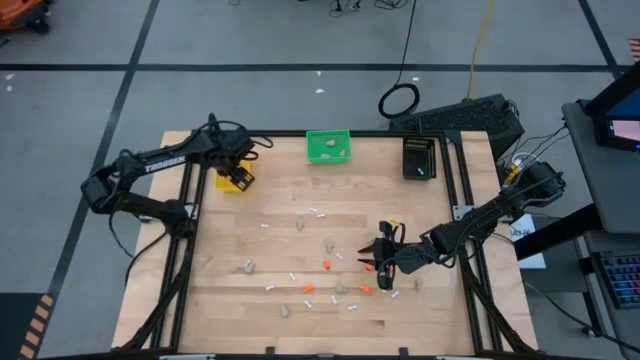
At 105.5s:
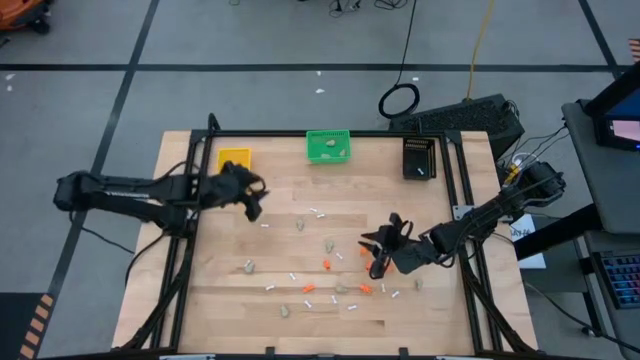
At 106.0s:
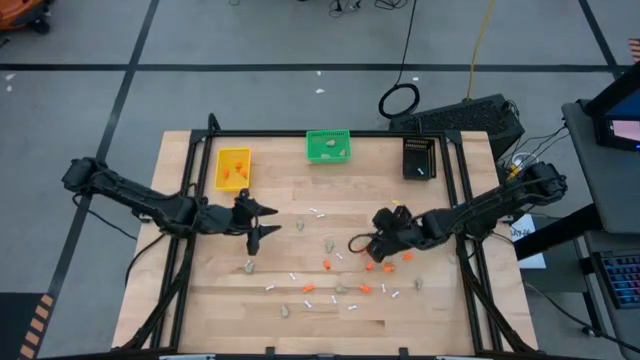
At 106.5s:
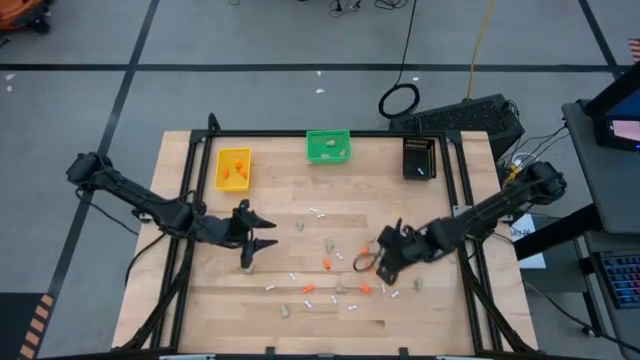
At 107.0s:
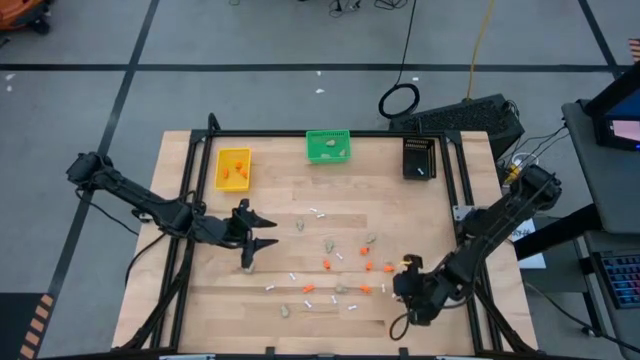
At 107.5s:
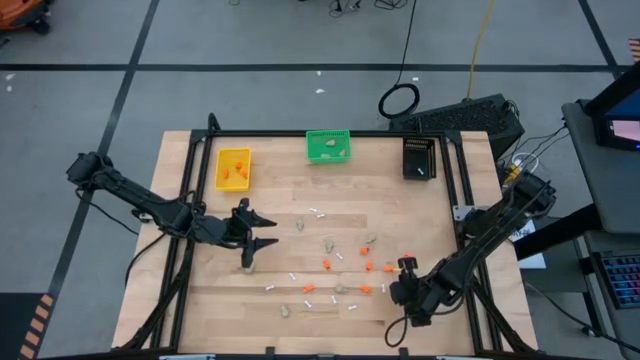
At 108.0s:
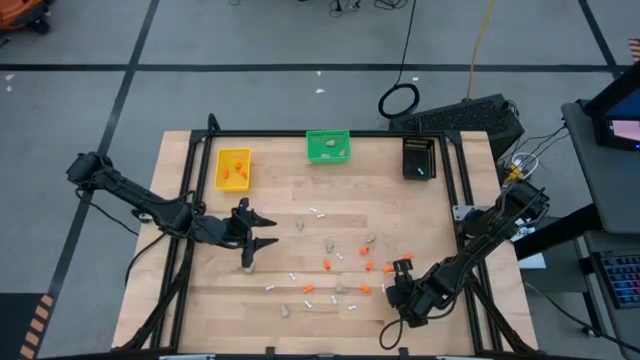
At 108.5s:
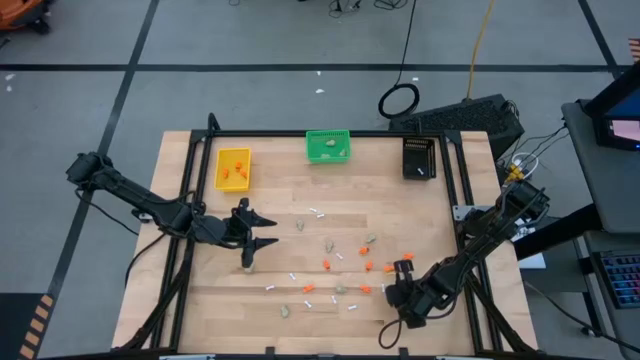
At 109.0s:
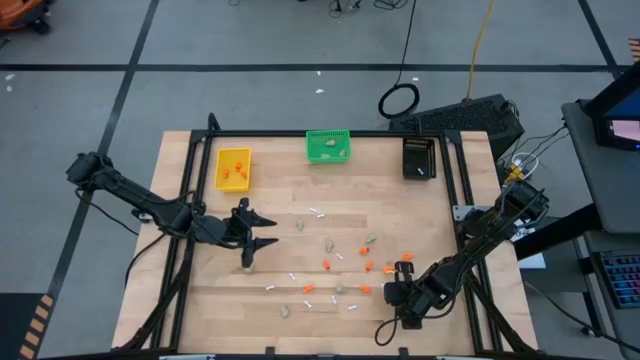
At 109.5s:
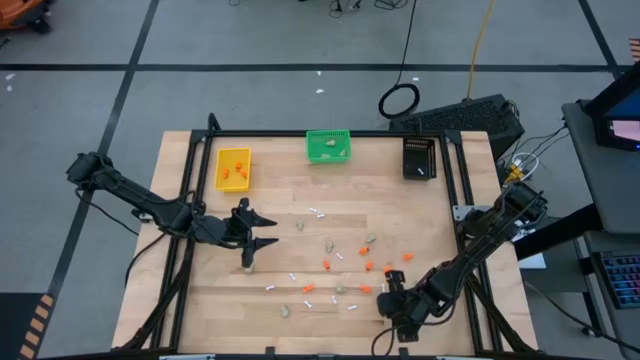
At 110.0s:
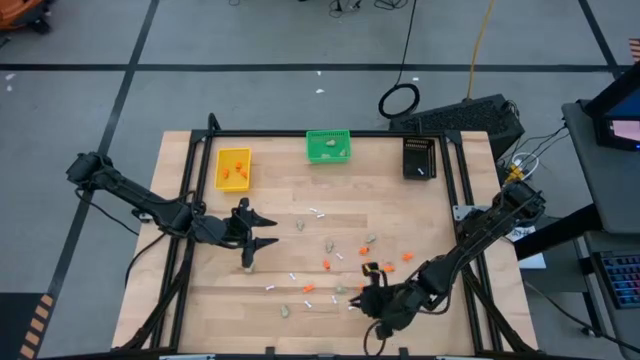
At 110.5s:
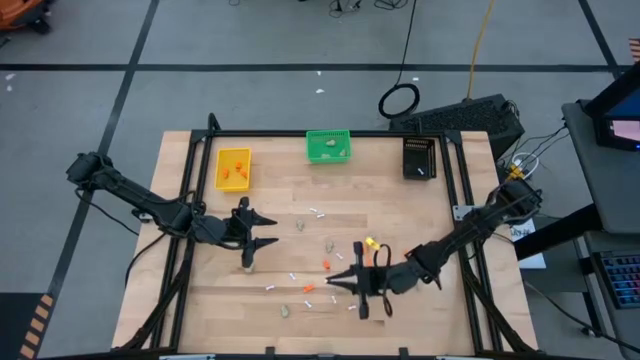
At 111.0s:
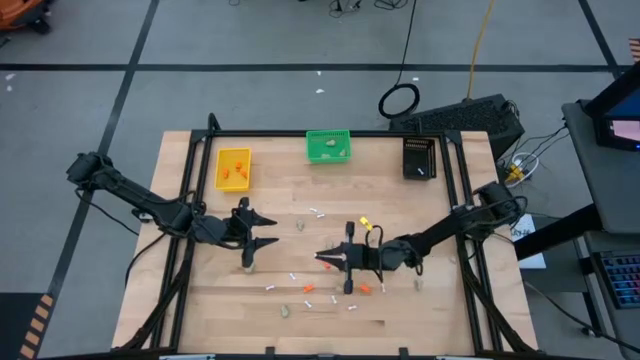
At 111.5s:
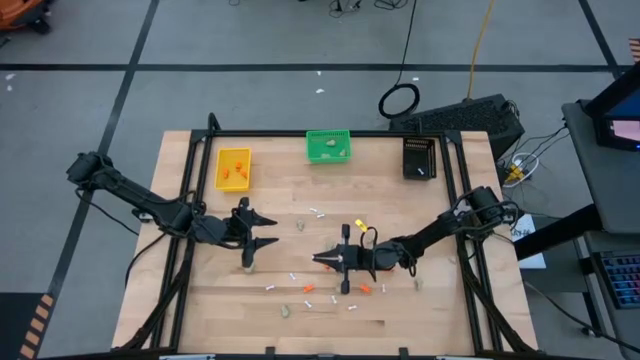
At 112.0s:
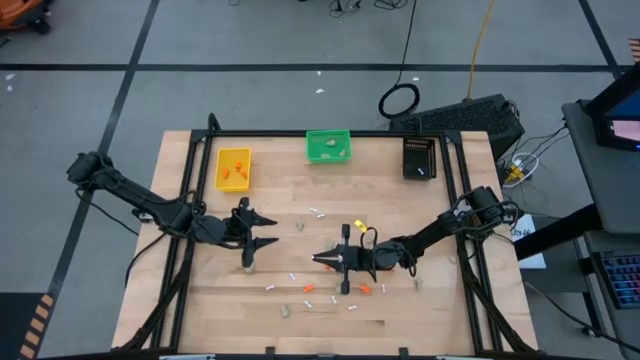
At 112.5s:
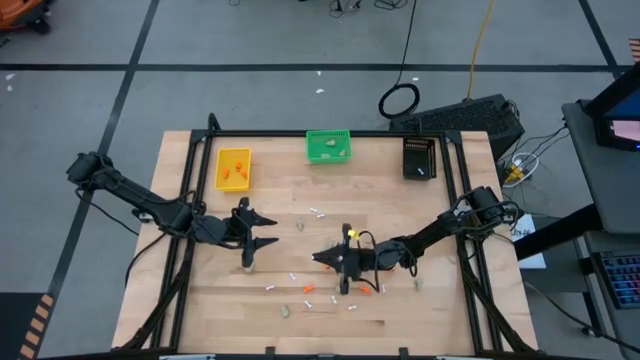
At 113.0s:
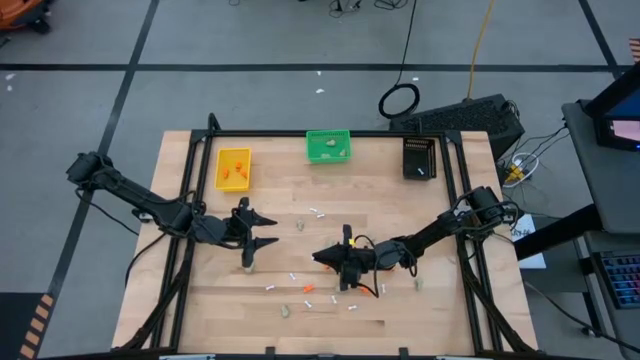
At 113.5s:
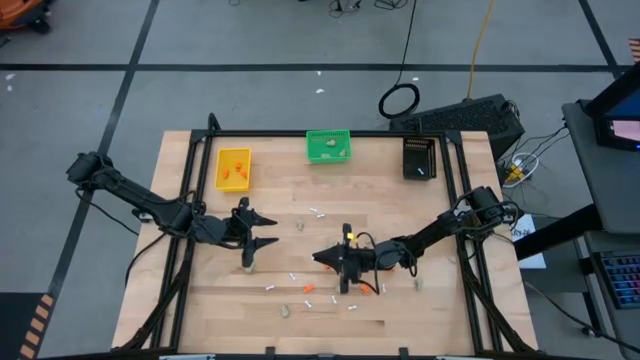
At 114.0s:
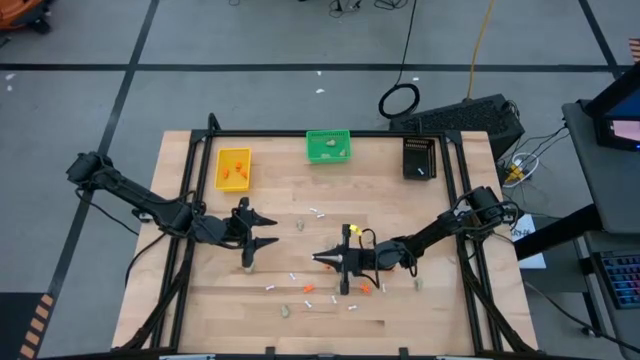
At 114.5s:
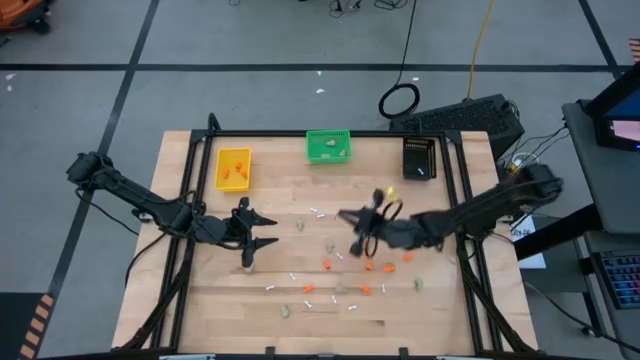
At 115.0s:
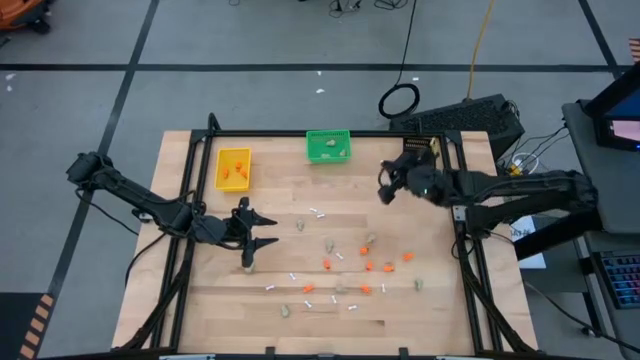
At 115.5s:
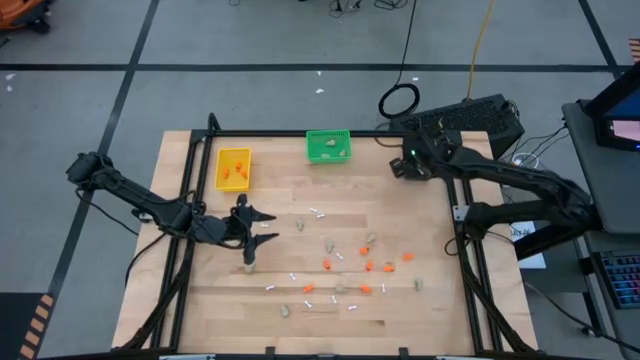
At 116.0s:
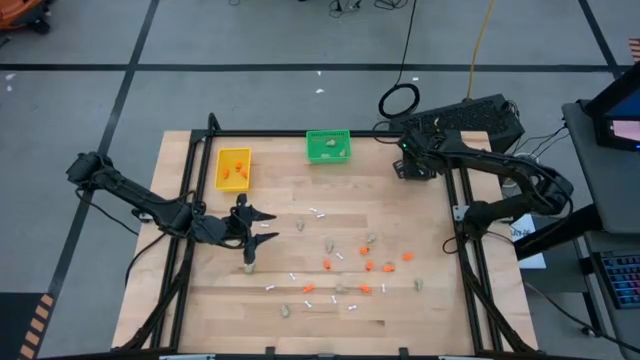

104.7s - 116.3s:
Task: Sort Halloween decoration
Put the white bone toy into the black bin

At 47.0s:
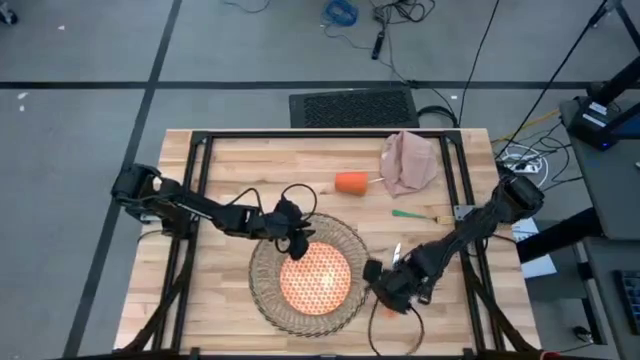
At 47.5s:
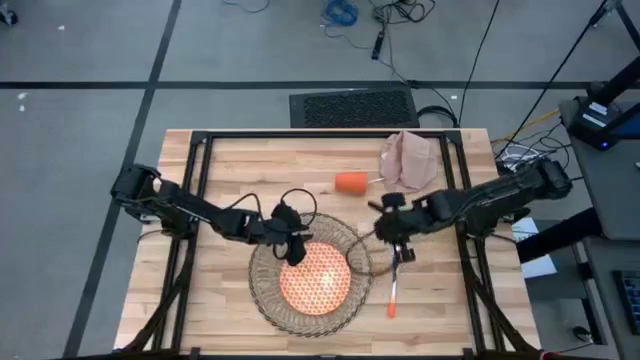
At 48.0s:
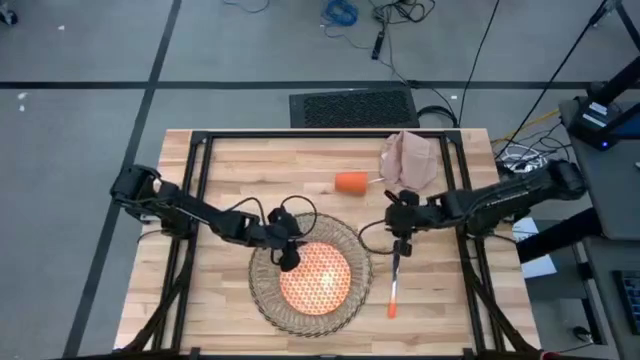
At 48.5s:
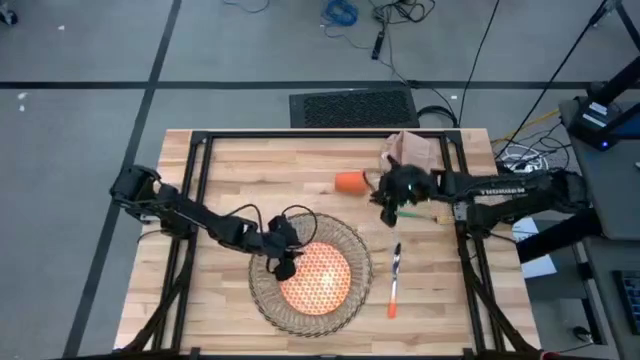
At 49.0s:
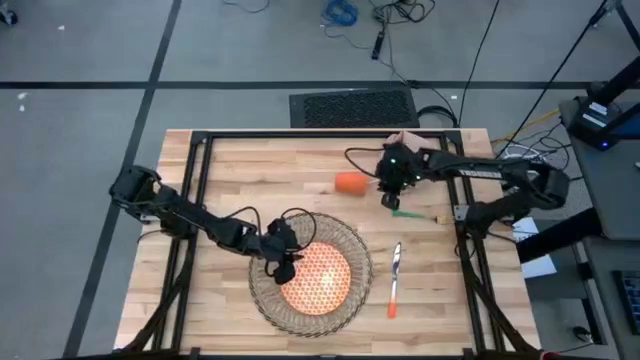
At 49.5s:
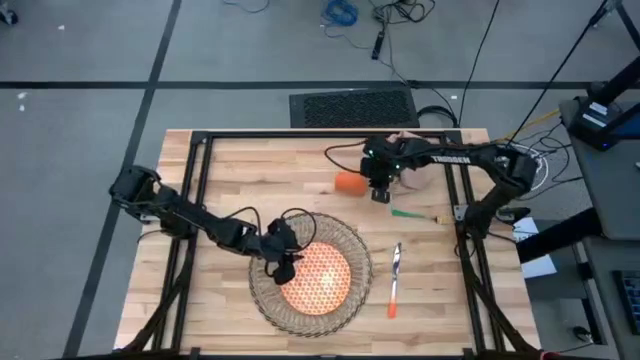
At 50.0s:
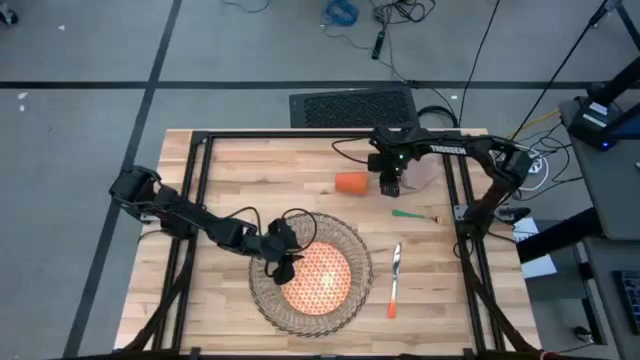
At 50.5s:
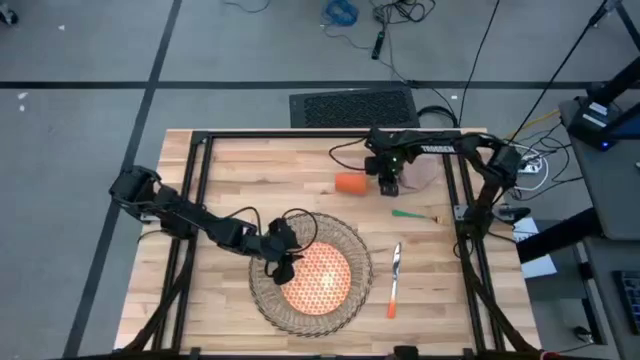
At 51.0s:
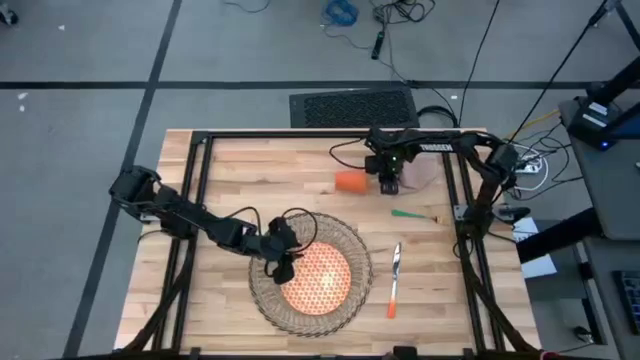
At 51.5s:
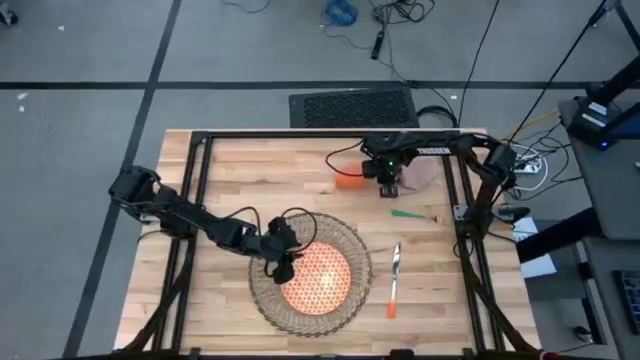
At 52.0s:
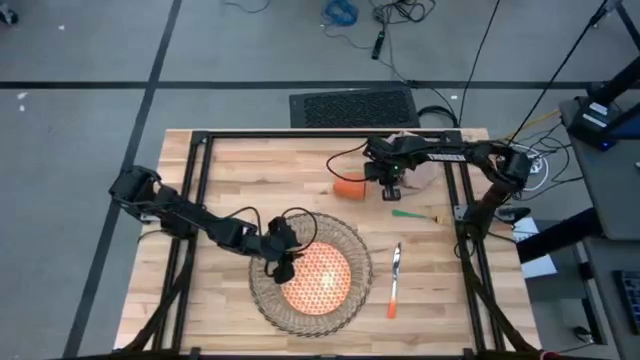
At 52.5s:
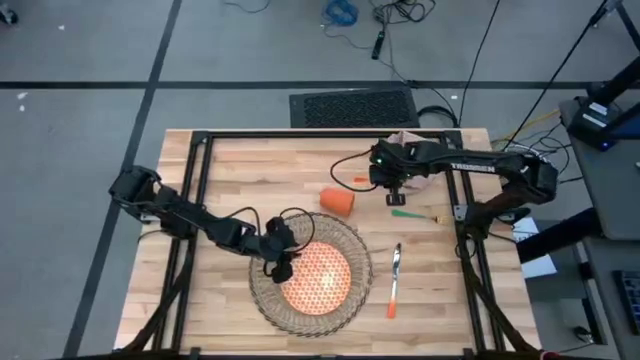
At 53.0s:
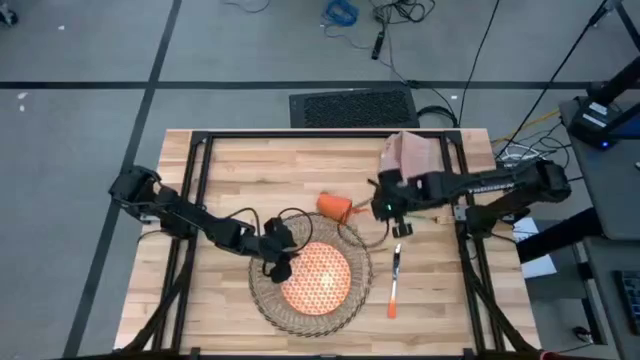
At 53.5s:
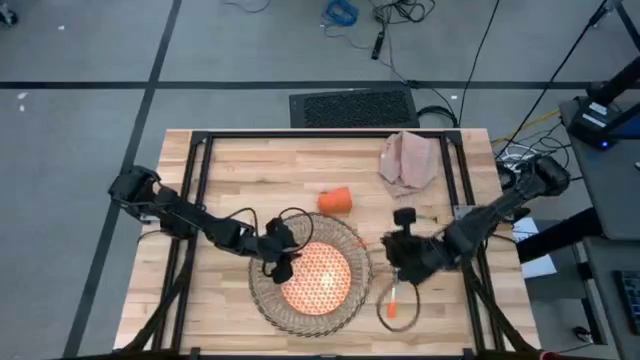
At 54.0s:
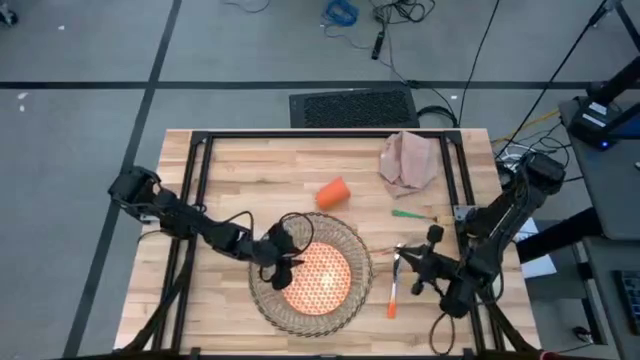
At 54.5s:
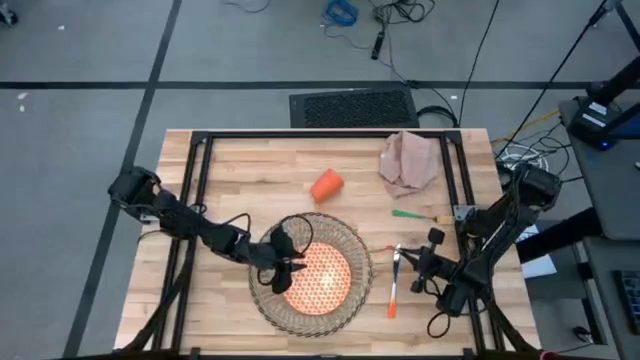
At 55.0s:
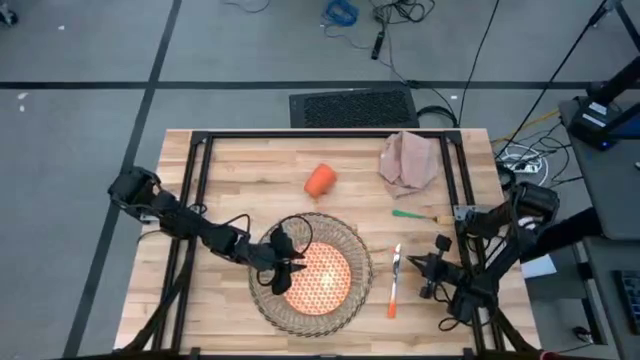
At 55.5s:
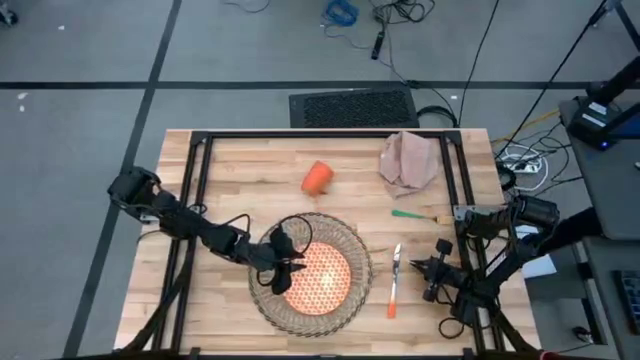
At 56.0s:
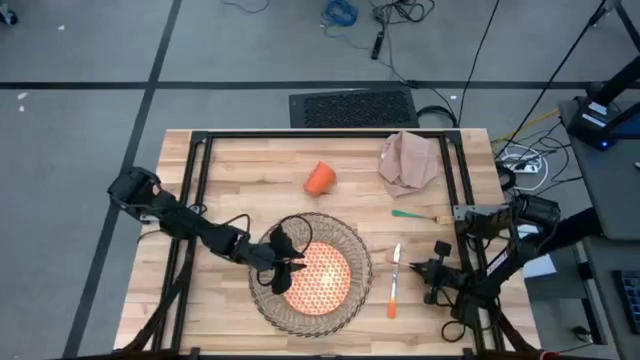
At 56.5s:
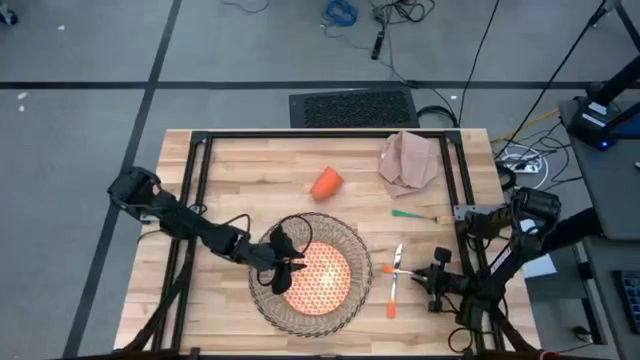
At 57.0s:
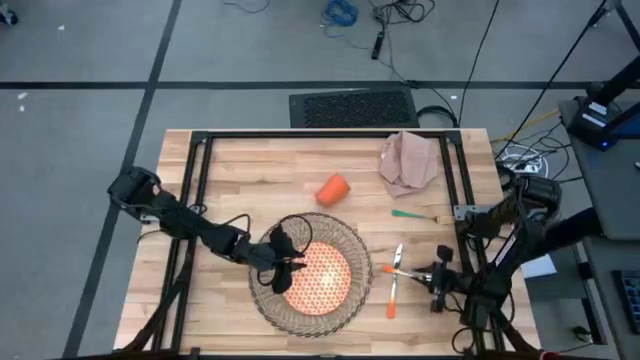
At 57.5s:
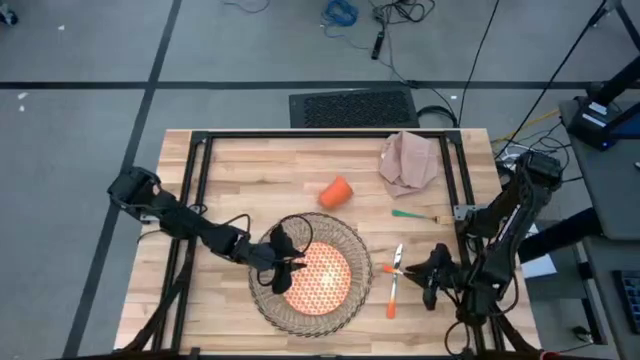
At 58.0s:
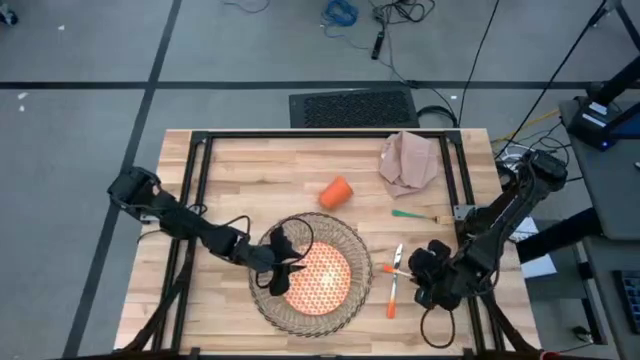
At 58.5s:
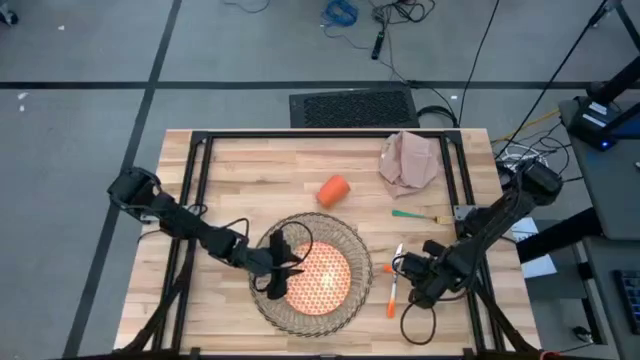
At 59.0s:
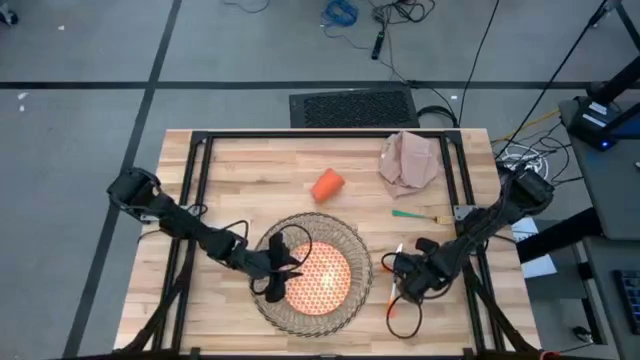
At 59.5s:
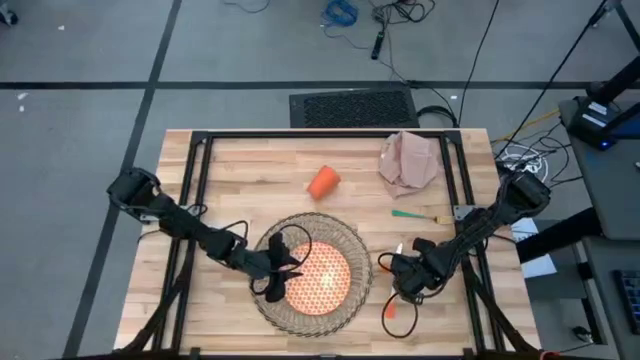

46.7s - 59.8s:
Task: Set table place
Put the orange spoon to the right of the orange knife
